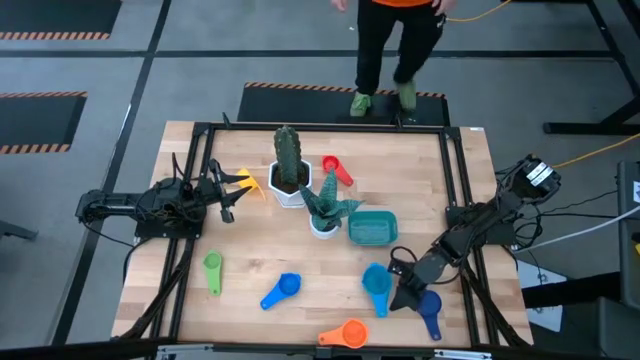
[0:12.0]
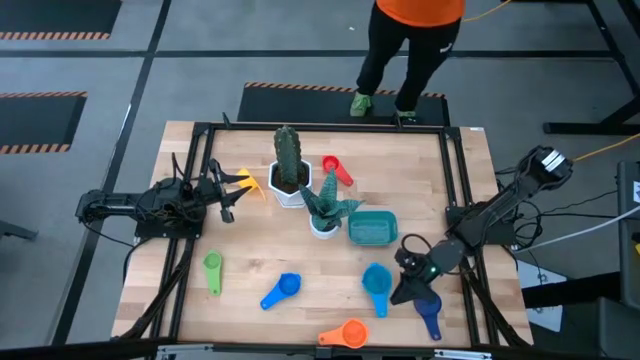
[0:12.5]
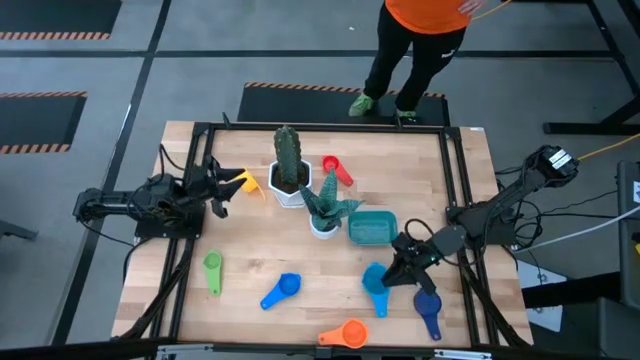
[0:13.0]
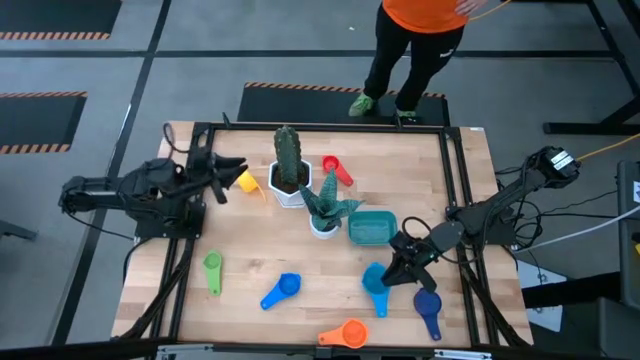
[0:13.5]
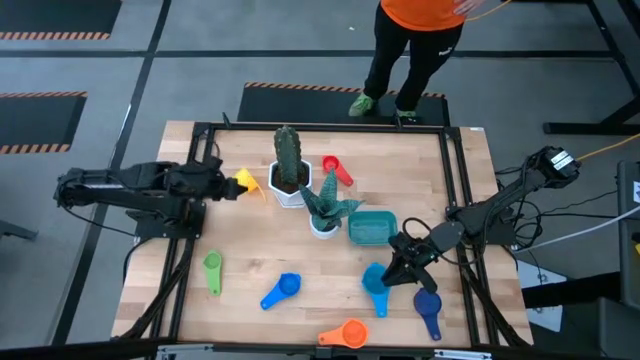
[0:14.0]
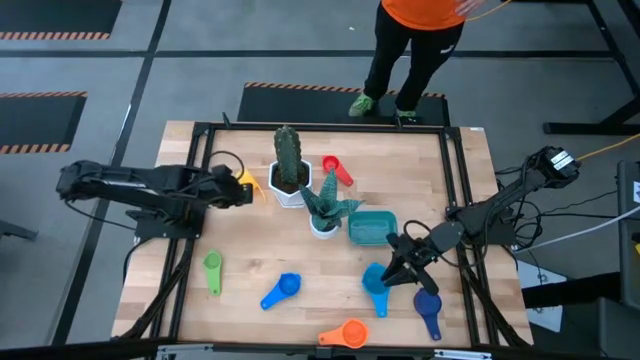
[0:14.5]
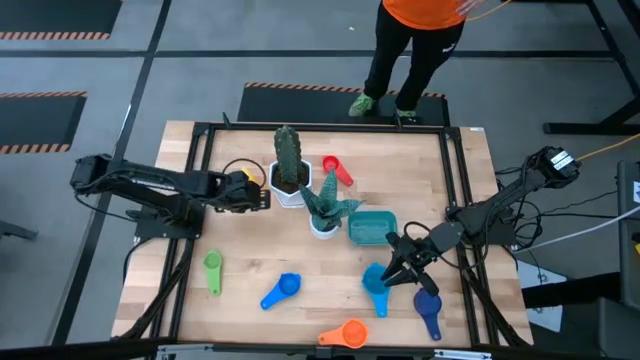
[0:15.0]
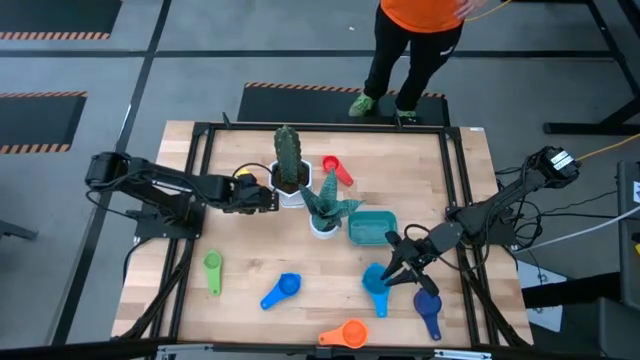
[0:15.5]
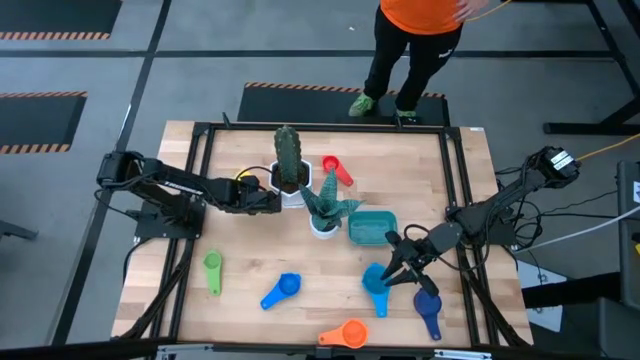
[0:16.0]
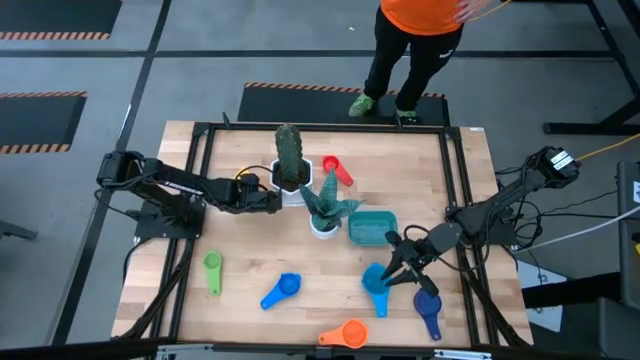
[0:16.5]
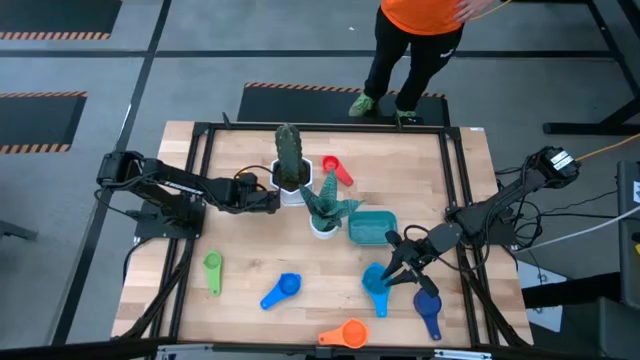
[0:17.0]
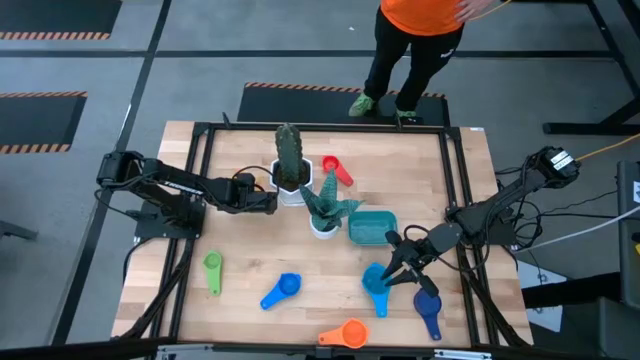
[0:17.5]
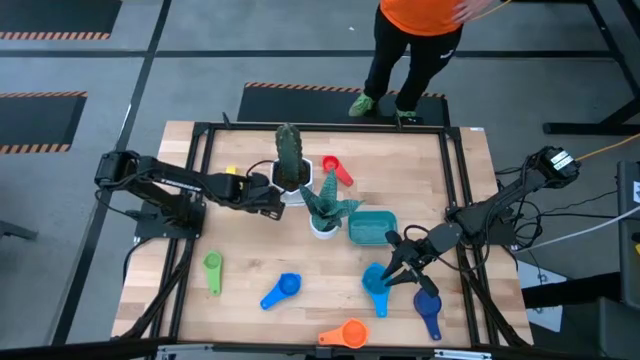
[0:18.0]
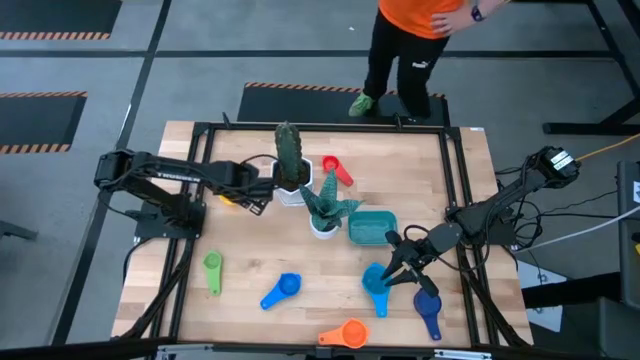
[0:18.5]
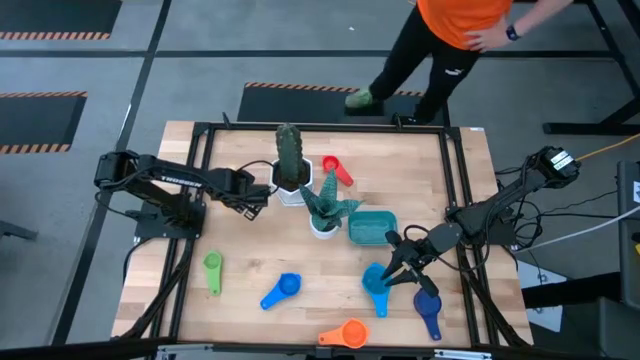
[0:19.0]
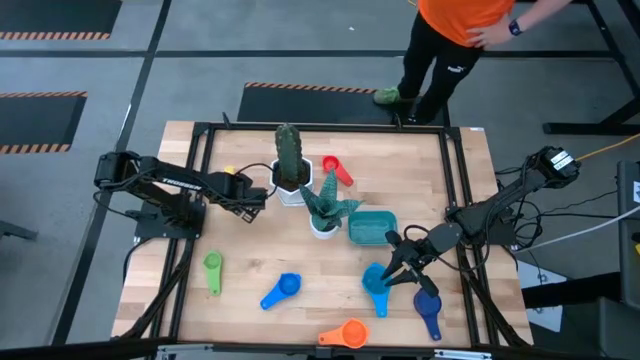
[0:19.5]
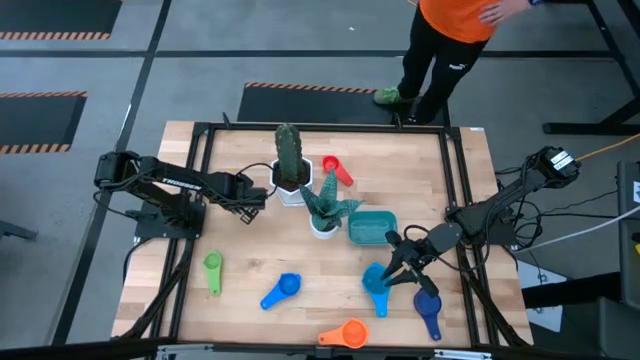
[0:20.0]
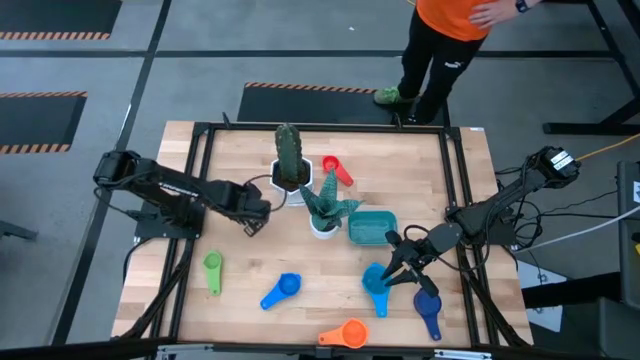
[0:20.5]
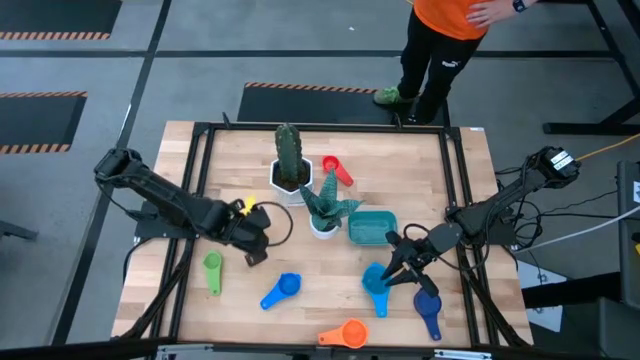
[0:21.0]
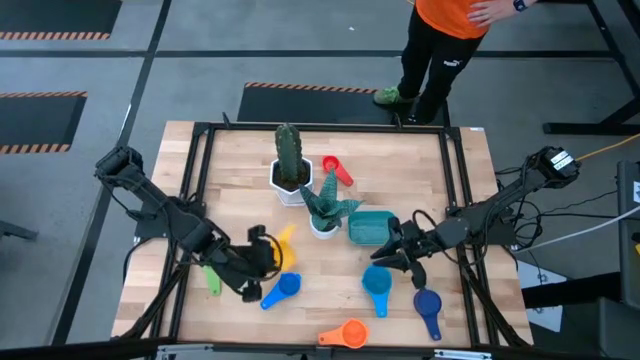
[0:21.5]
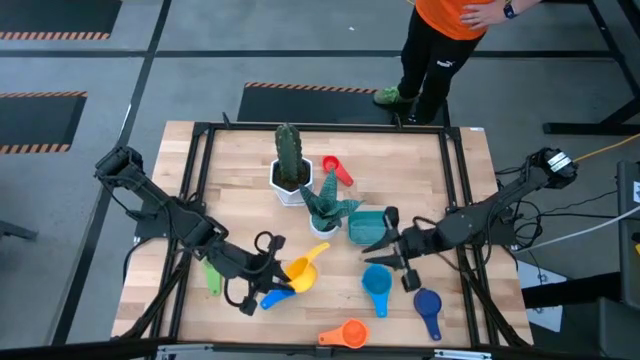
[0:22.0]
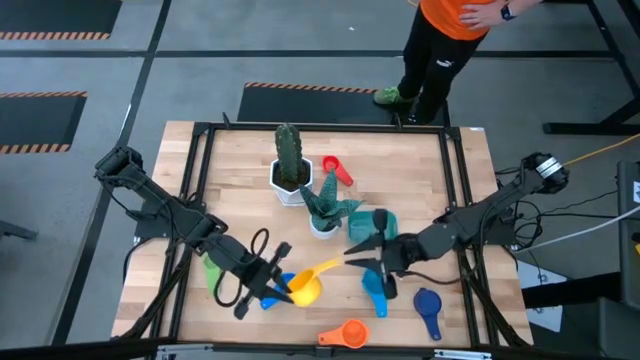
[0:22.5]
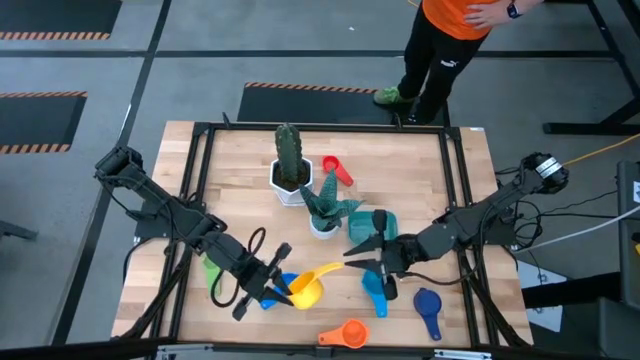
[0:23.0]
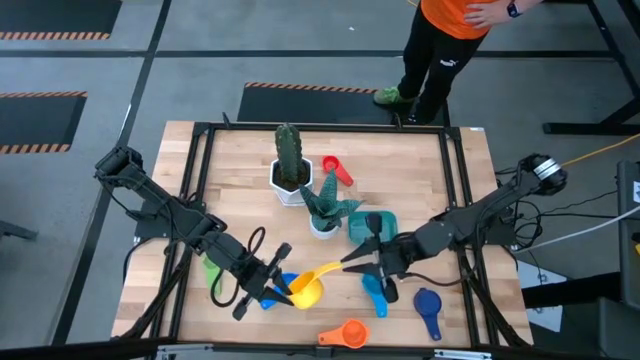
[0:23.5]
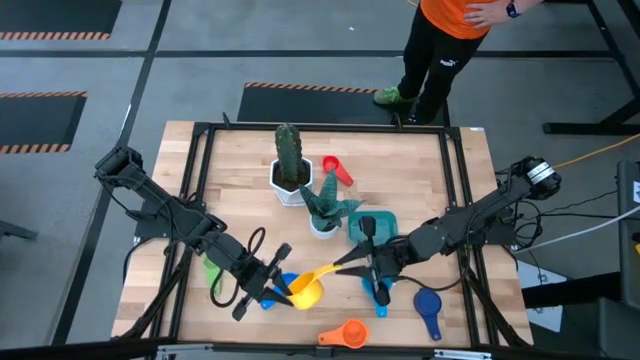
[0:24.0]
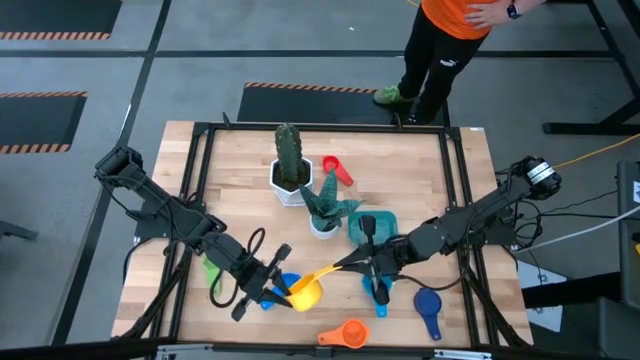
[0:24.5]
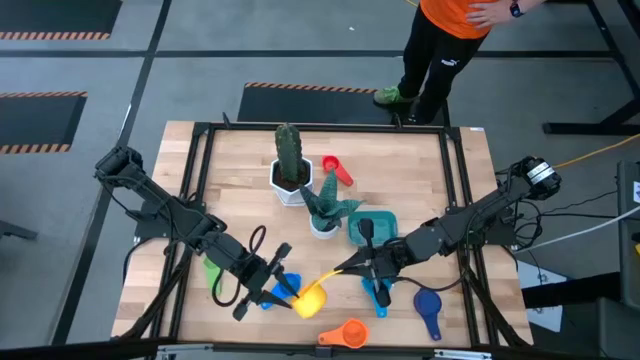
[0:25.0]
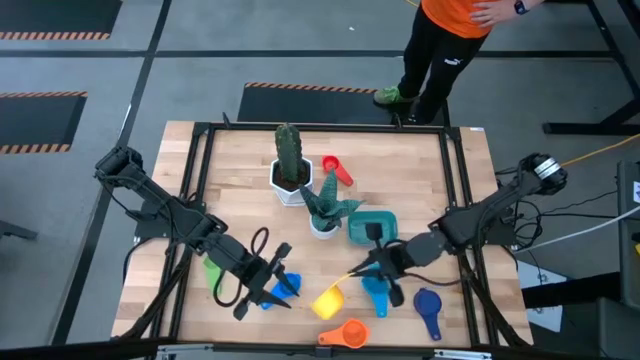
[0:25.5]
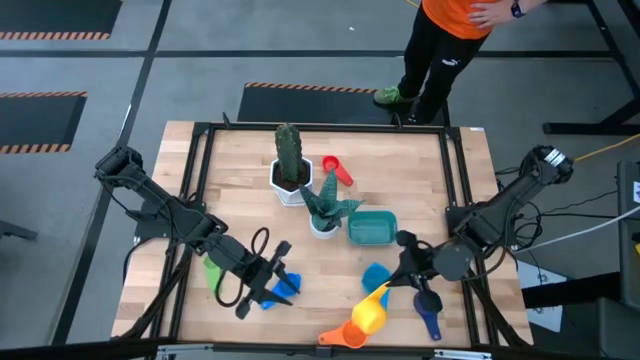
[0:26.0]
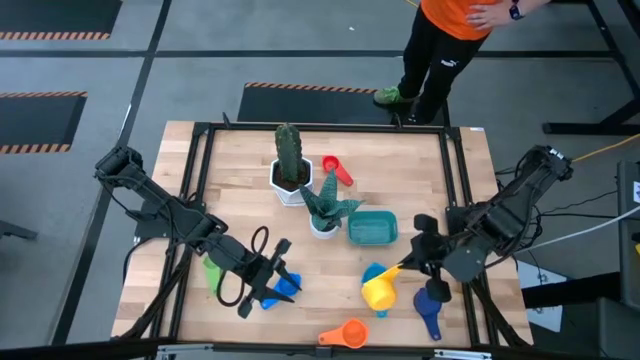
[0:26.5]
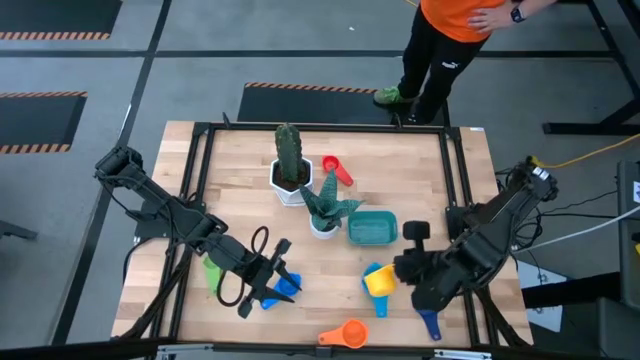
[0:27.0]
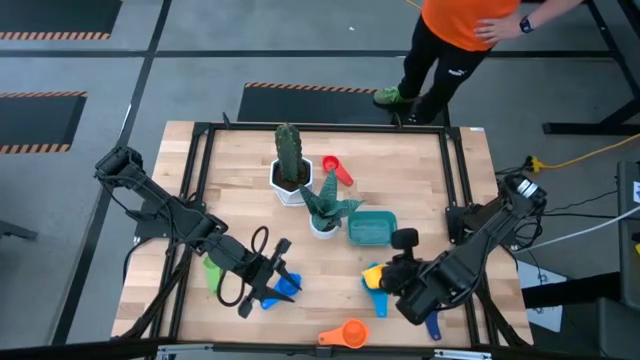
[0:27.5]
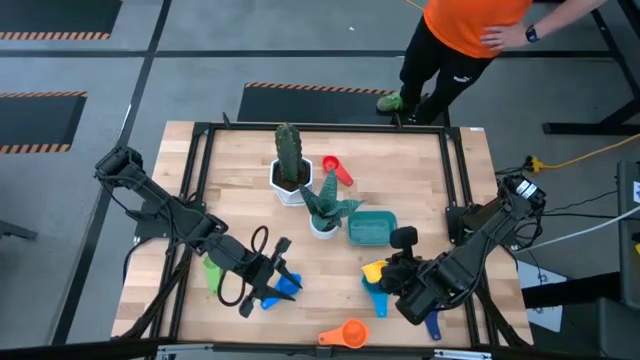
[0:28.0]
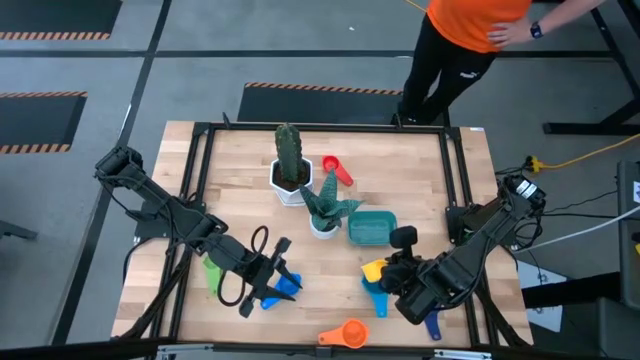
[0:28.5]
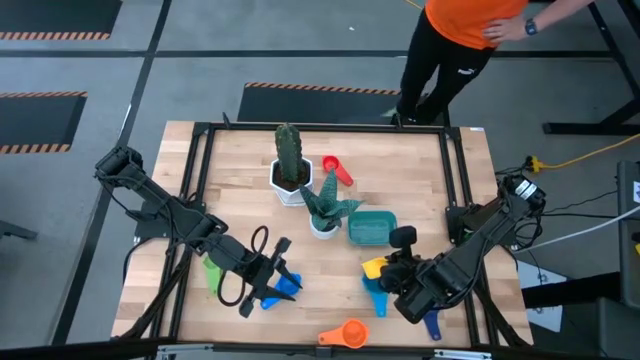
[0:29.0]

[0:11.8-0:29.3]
Task: Nest measuring cups in basket
Stack the yellow measuring cup on top of the light blue measuring cup

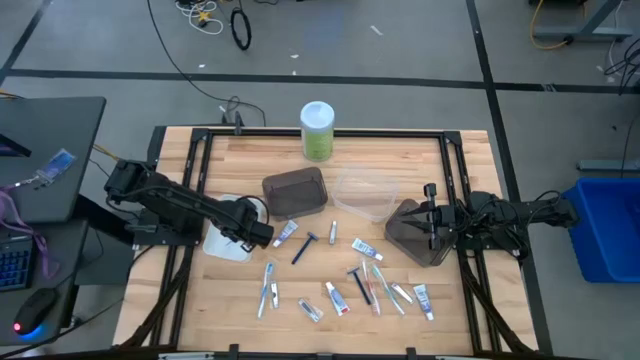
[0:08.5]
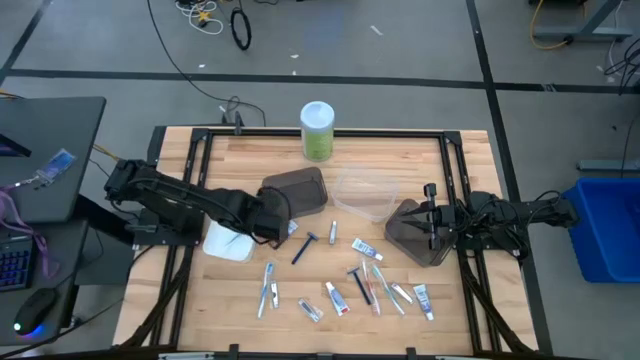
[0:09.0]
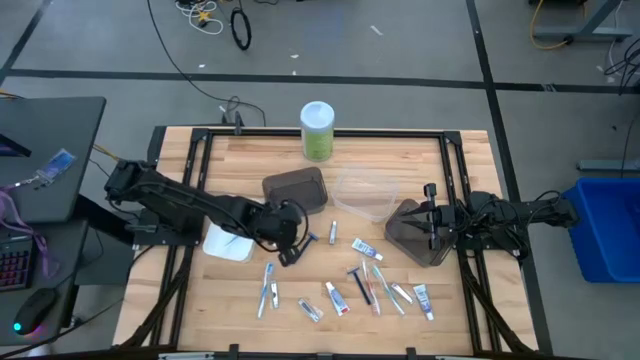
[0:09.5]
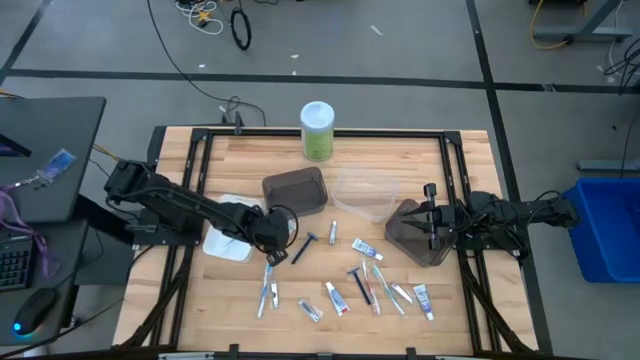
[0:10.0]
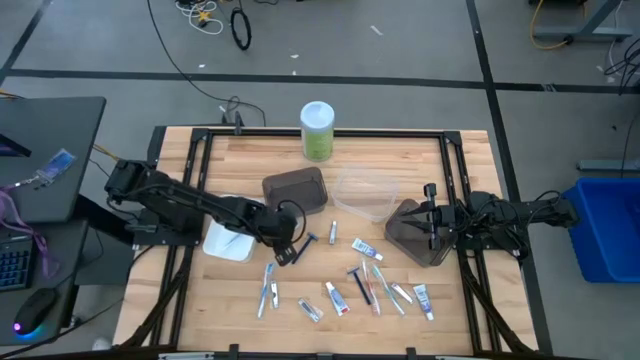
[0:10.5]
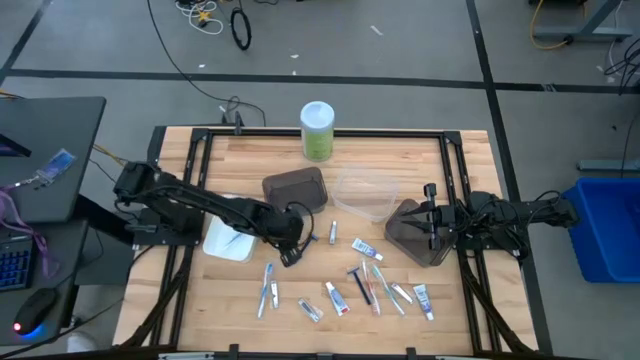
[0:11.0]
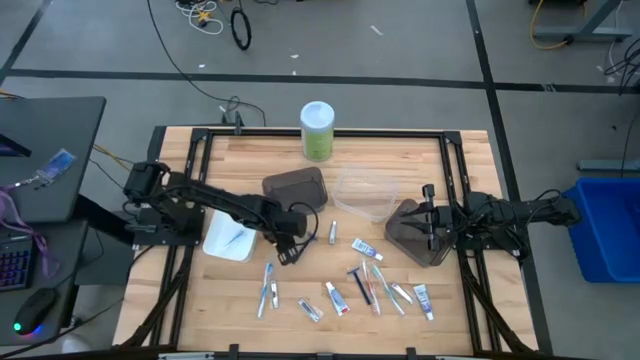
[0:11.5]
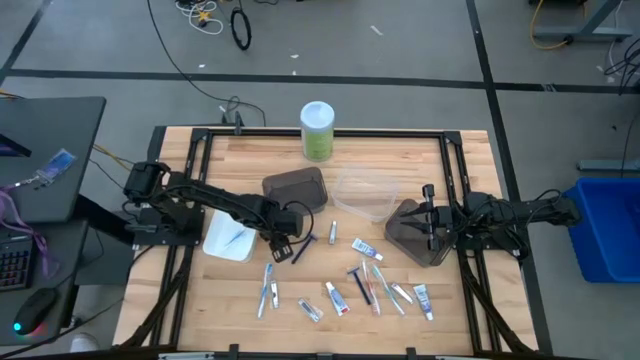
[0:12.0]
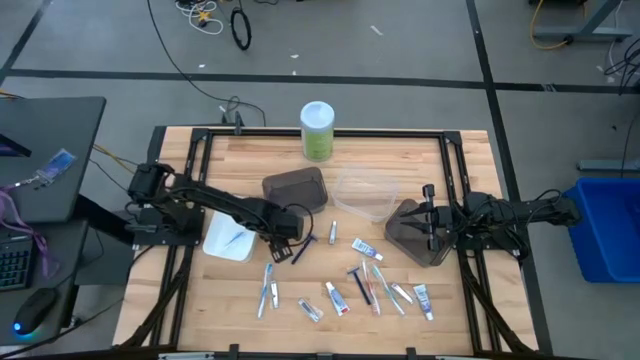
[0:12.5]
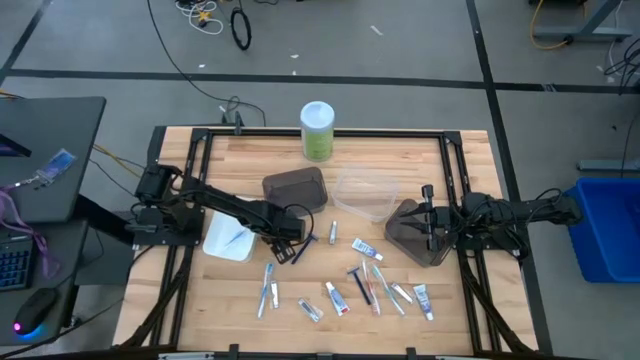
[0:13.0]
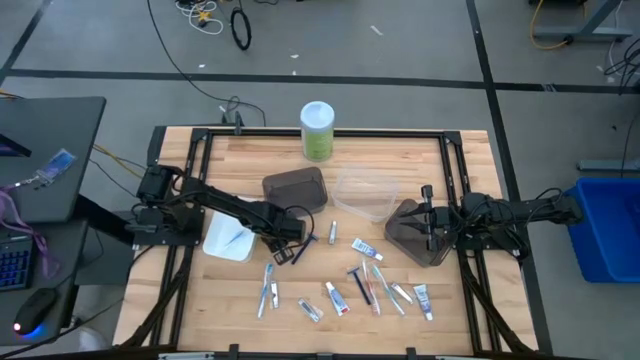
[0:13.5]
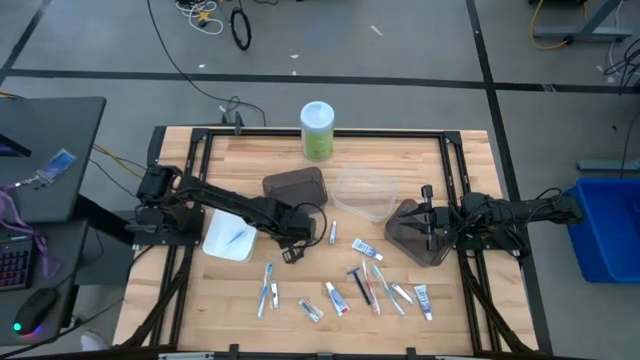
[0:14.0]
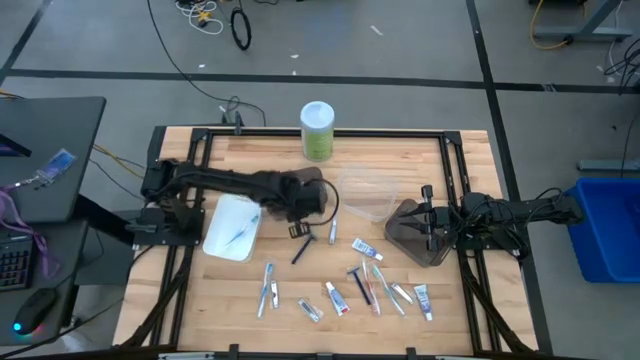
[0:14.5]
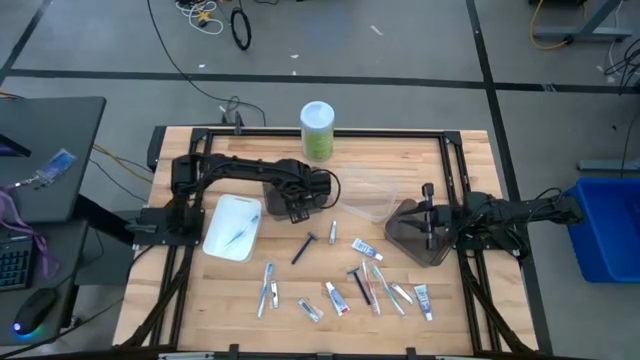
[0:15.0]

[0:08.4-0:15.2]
Task: Pick & Place Travel size toiletries
Put the toothpaste into the left black bin
